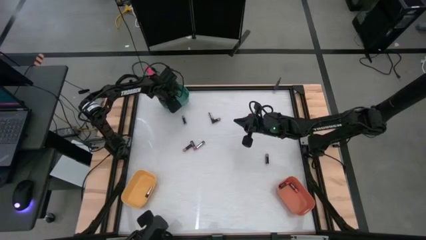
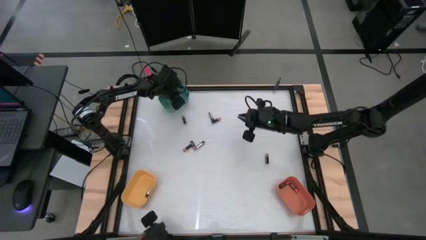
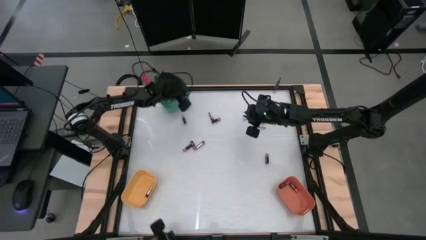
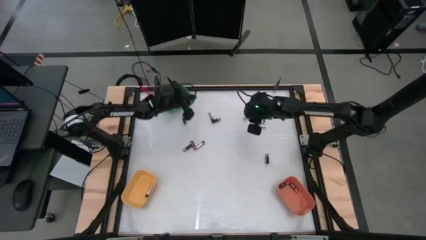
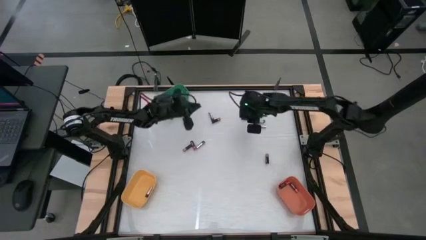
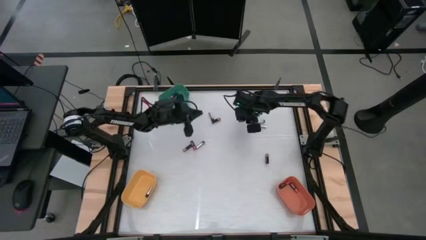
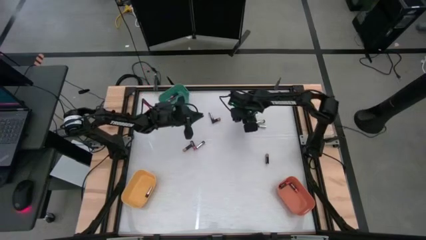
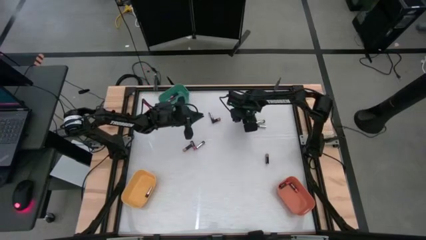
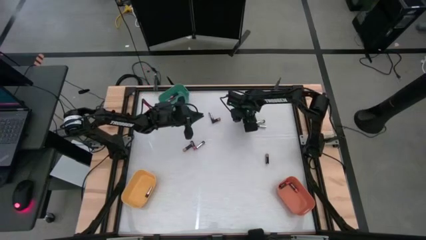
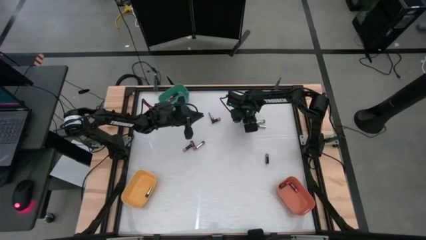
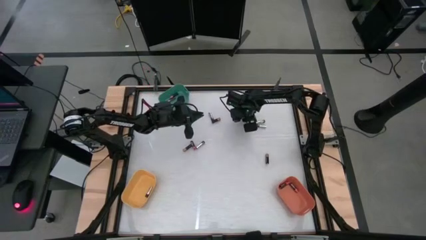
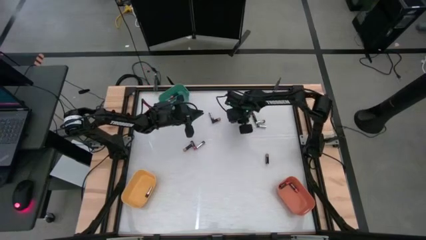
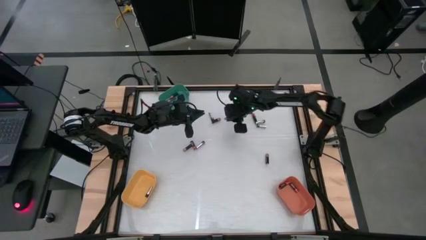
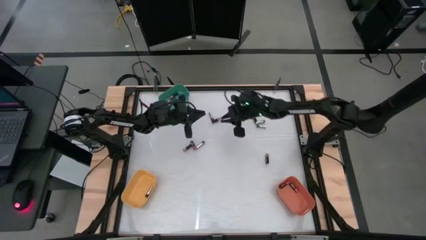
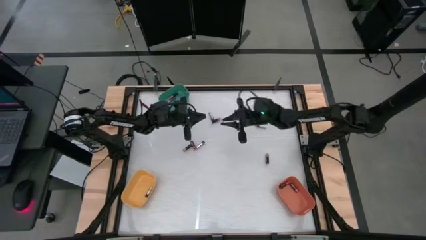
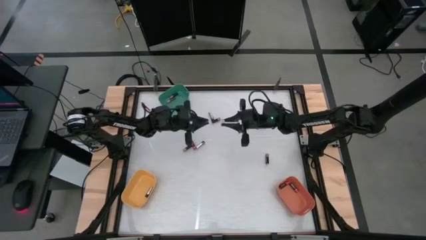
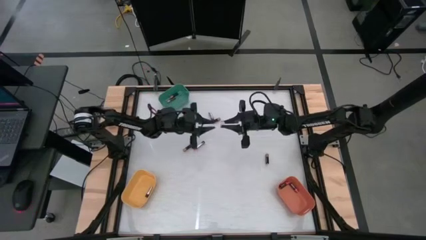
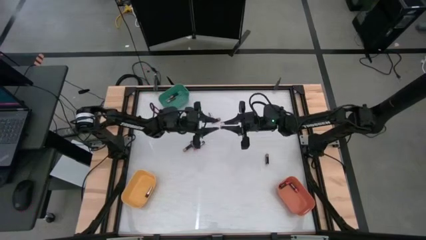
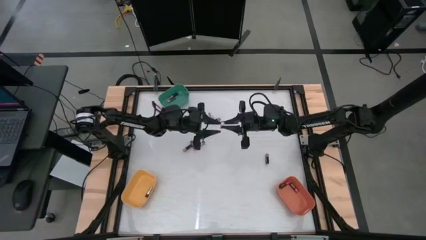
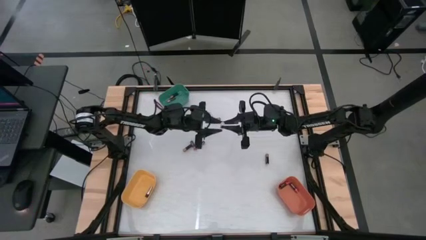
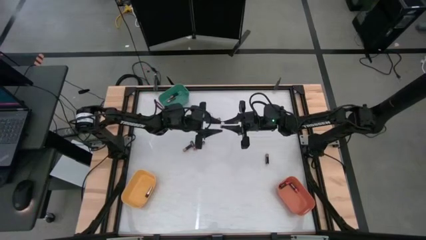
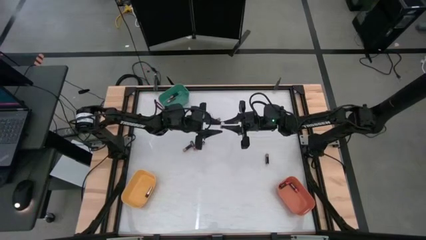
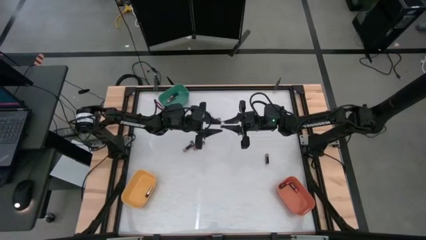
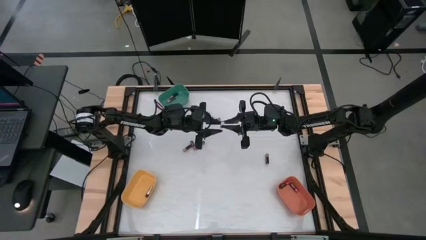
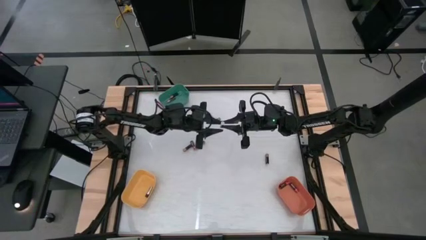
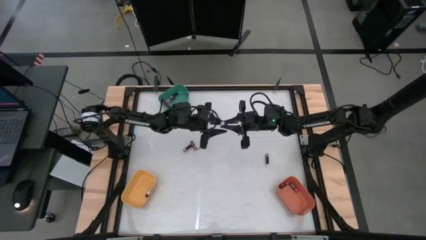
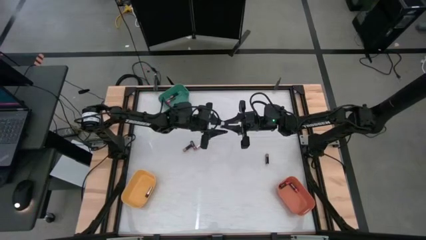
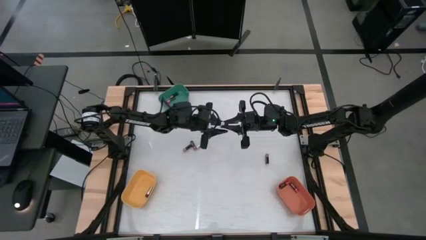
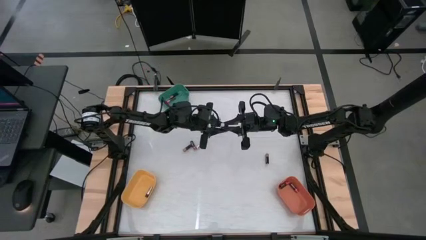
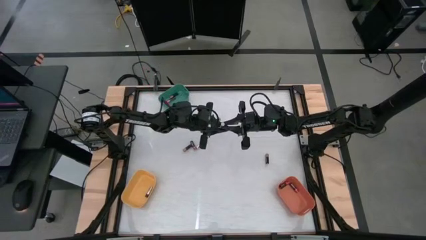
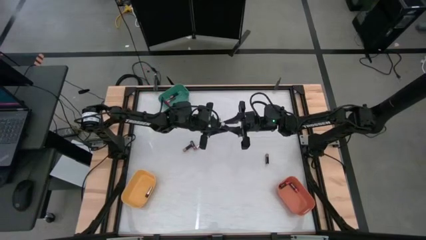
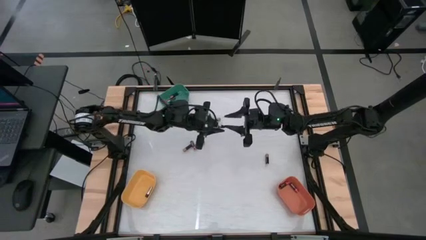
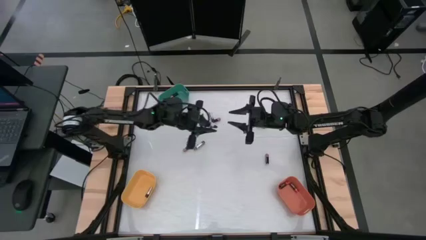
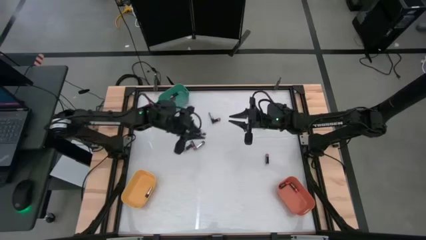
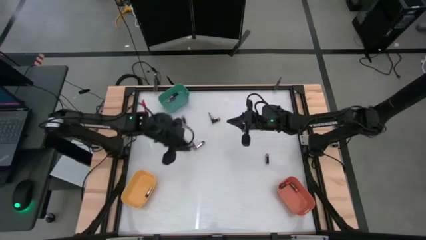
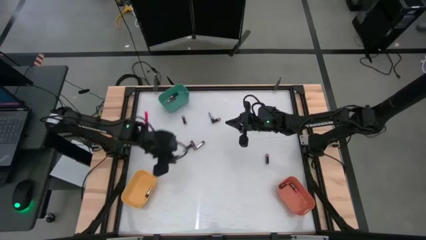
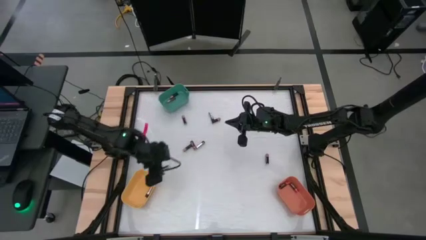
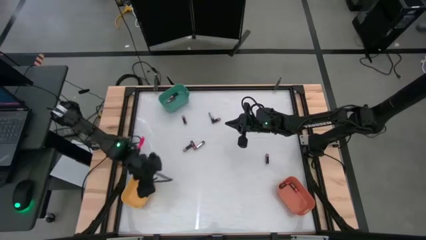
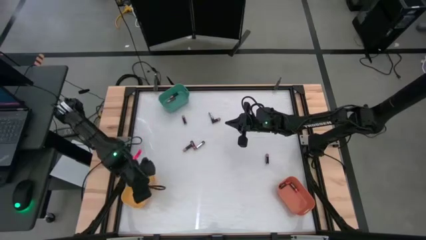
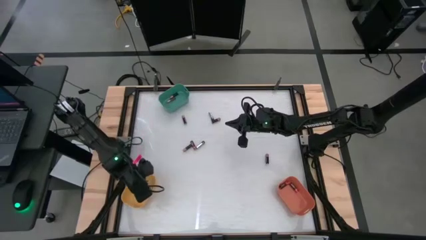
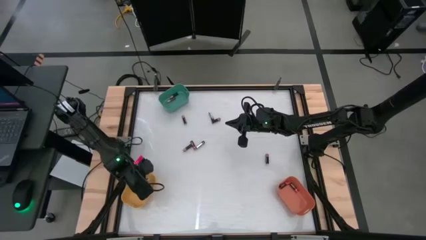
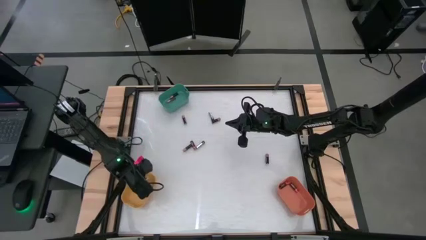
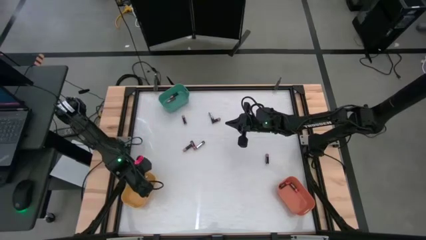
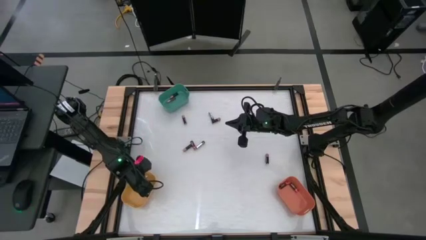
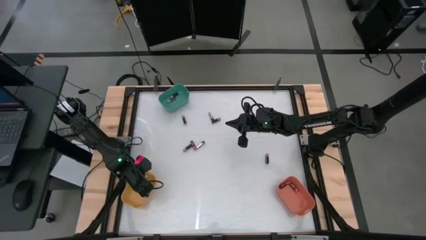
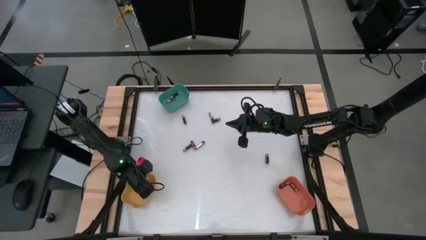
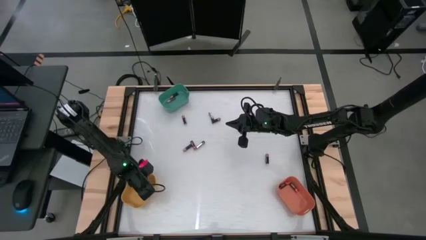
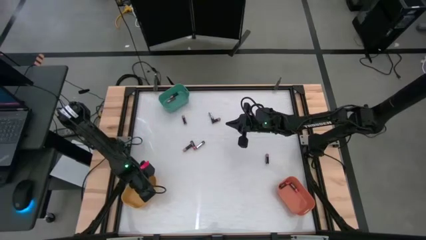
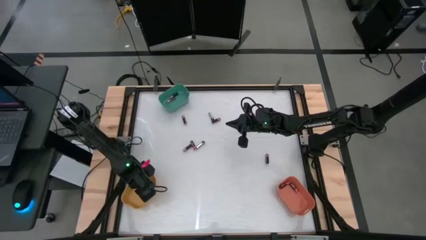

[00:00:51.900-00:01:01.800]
Task: Sort batteries
Put the silver battery into the yellow bin

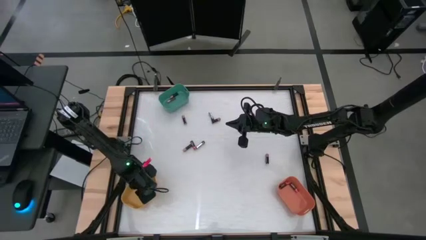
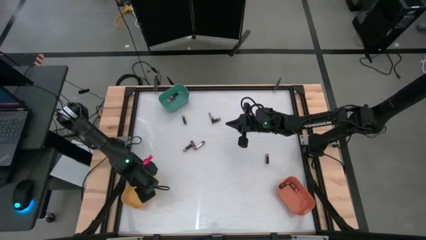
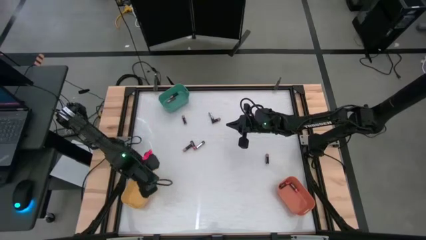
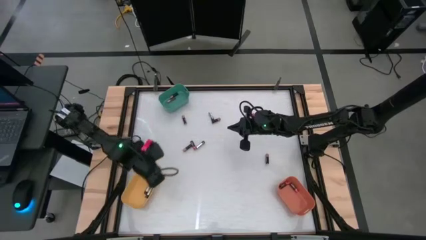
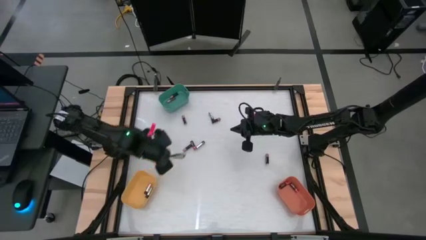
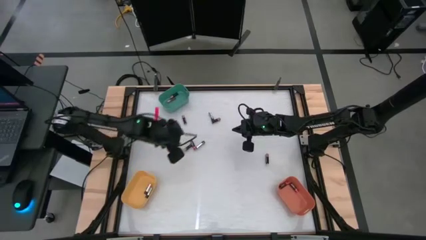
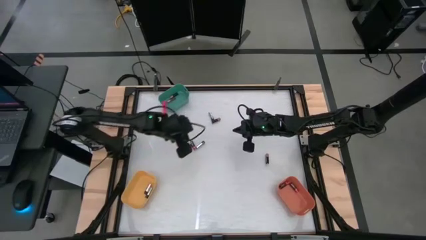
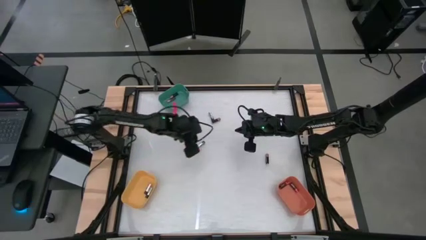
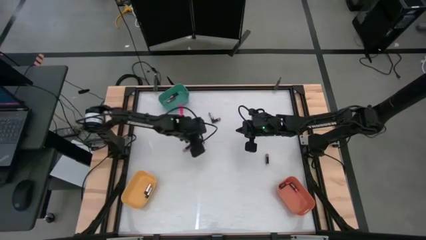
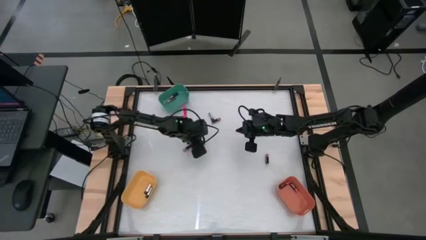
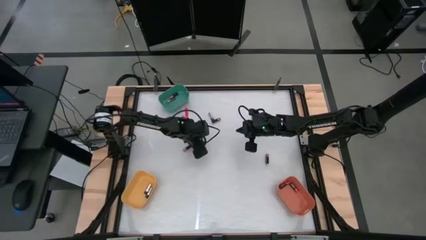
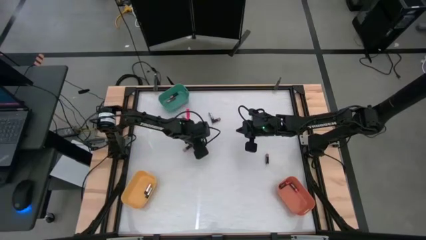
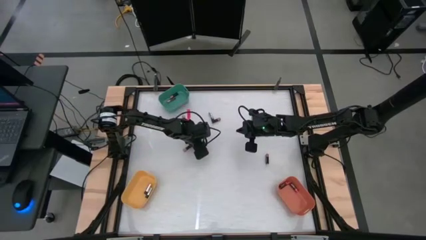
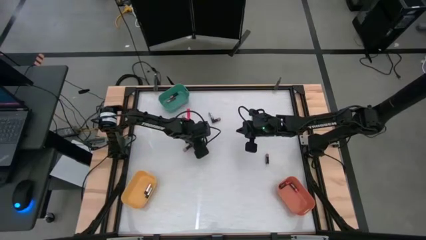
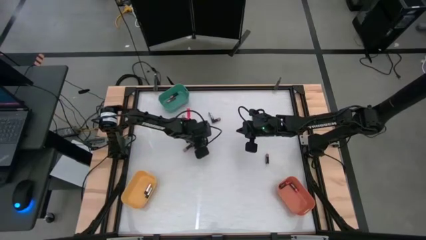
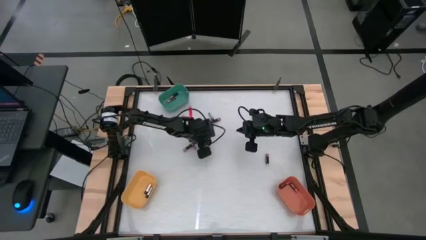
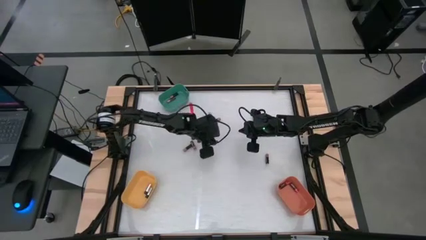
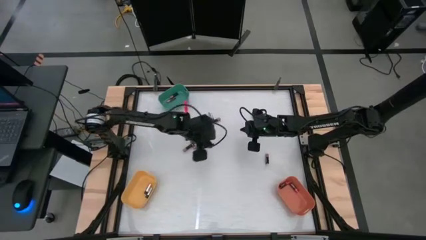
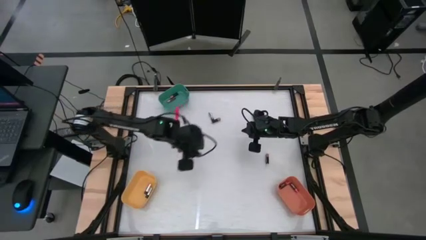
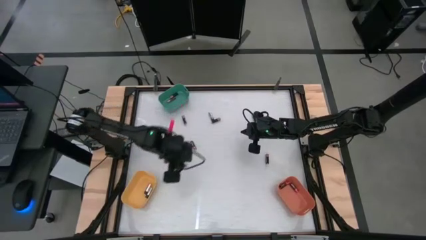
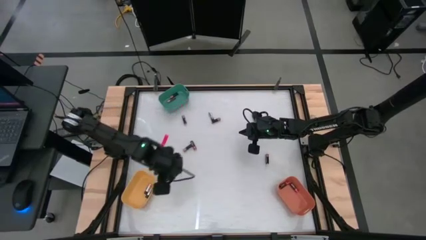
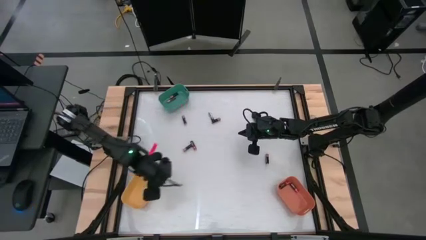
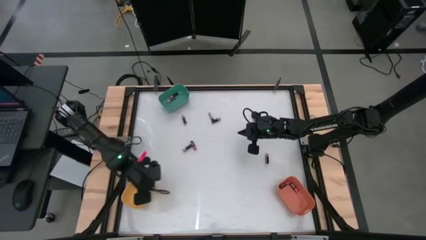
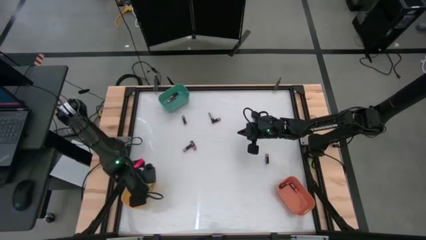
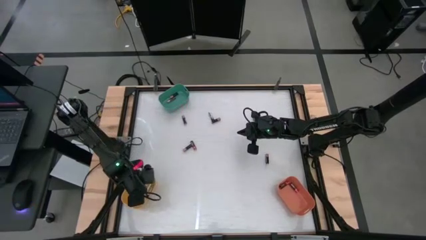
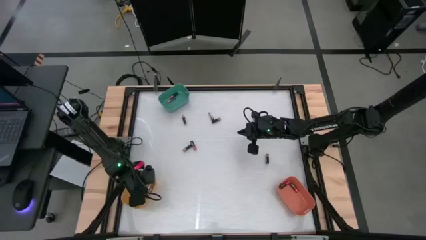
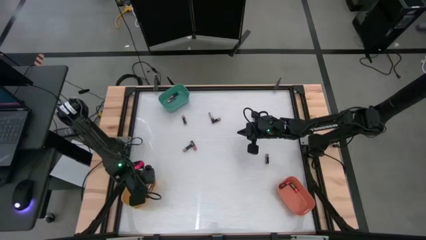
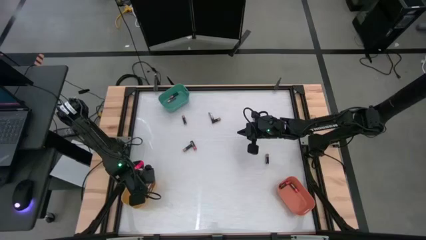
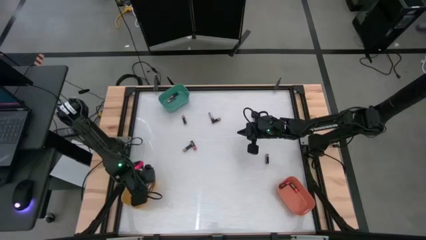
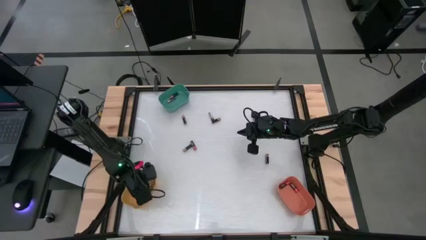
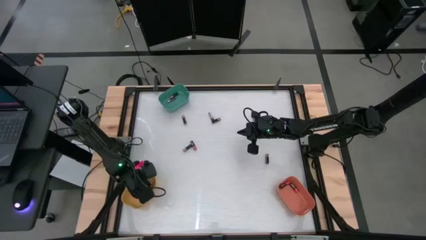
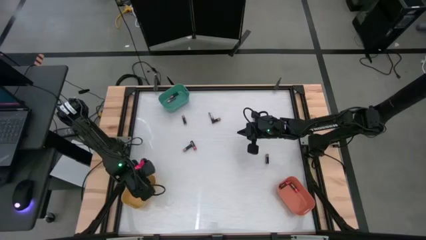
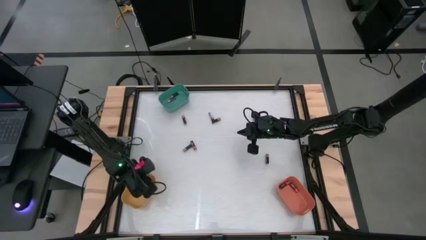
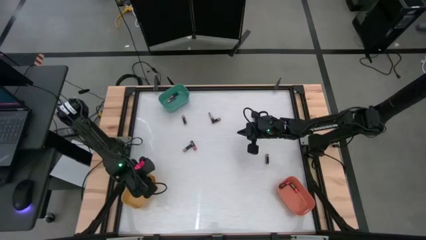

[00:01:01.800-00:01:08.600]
Put the silver battery into the yellow bin
